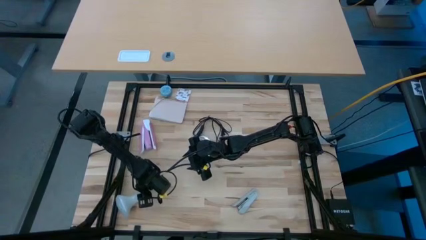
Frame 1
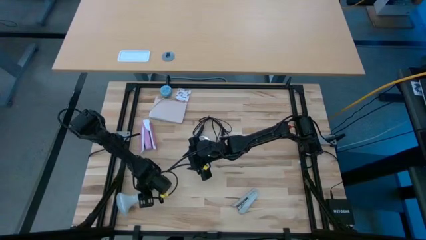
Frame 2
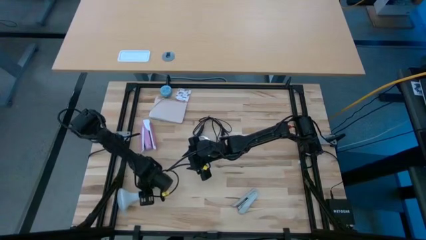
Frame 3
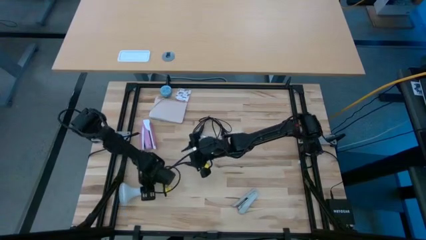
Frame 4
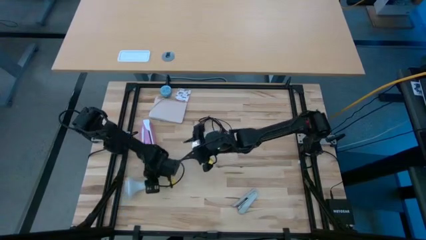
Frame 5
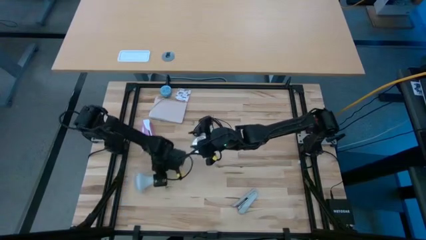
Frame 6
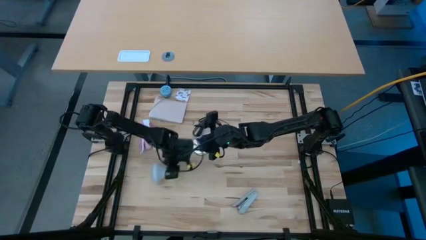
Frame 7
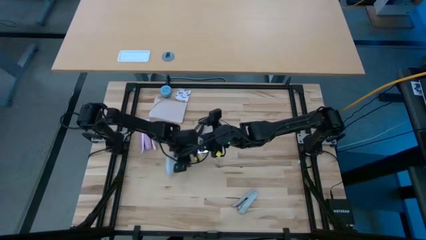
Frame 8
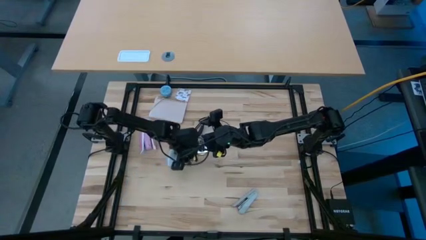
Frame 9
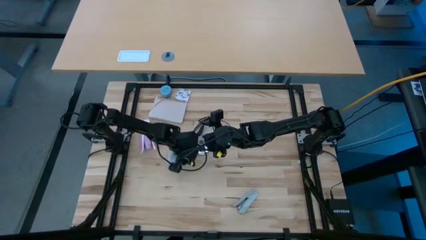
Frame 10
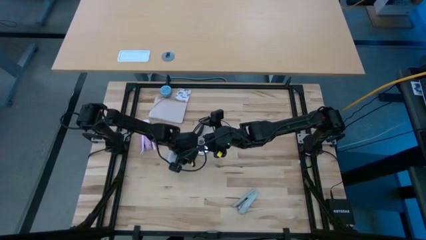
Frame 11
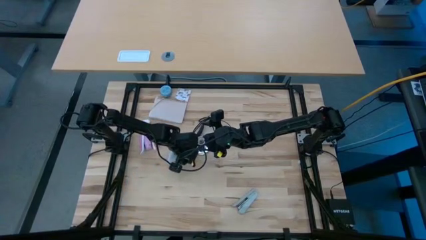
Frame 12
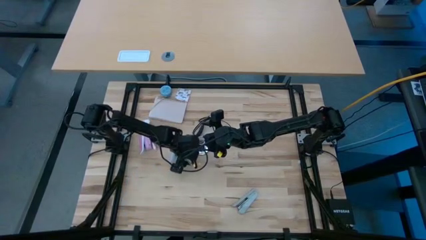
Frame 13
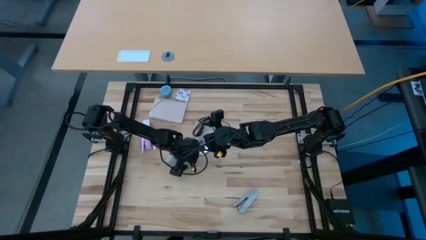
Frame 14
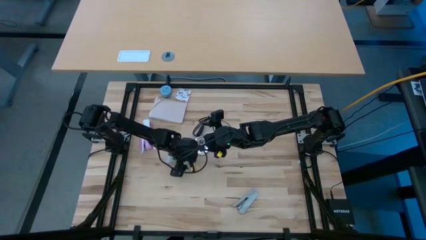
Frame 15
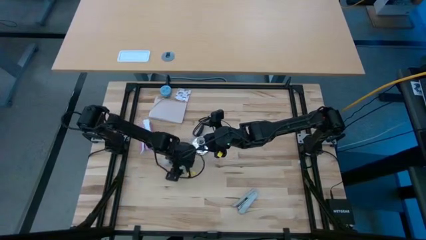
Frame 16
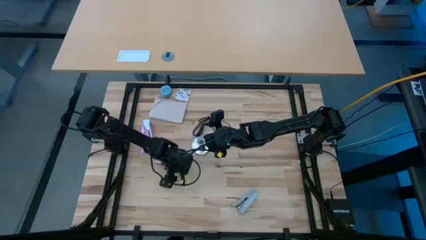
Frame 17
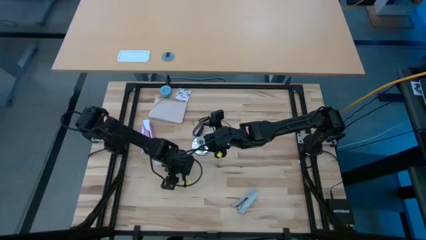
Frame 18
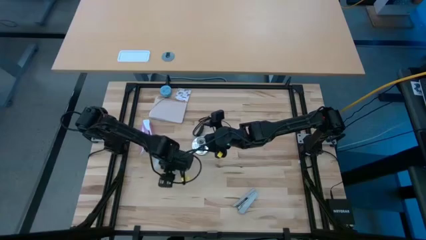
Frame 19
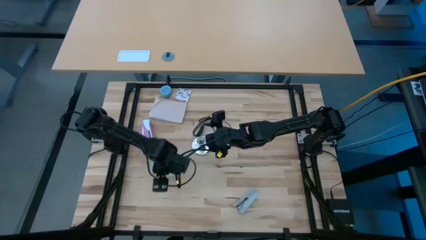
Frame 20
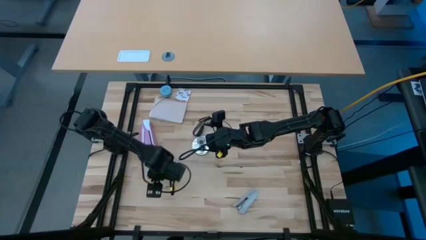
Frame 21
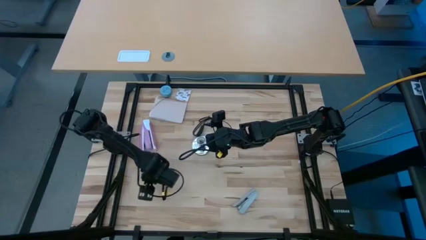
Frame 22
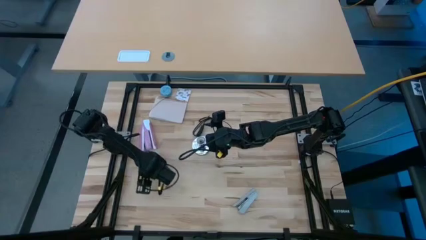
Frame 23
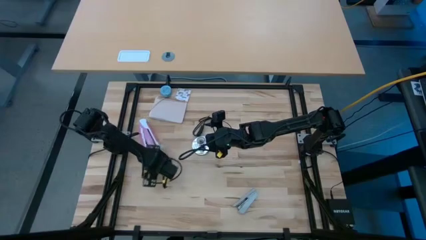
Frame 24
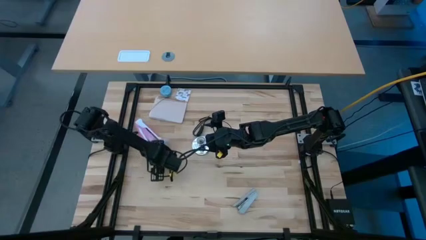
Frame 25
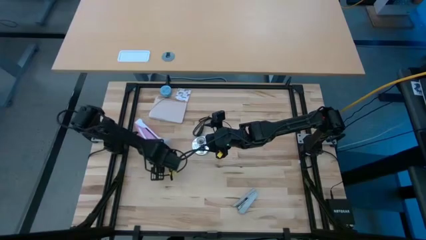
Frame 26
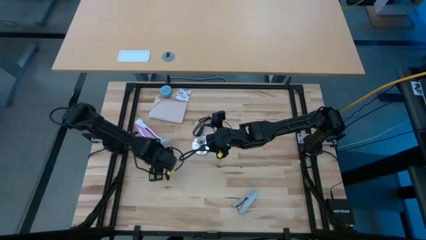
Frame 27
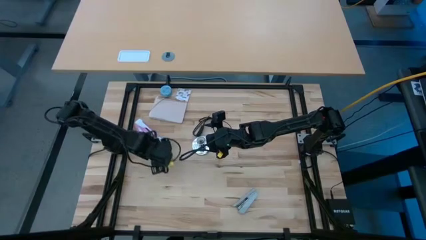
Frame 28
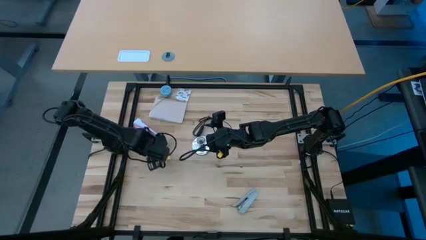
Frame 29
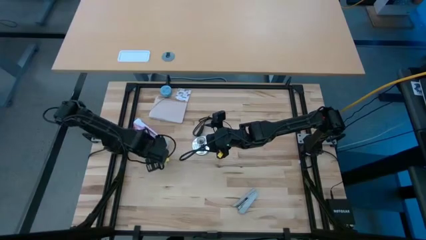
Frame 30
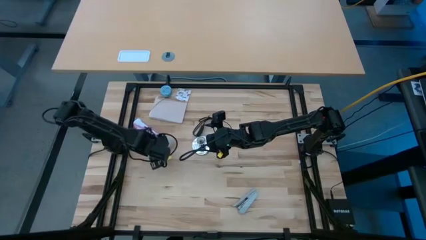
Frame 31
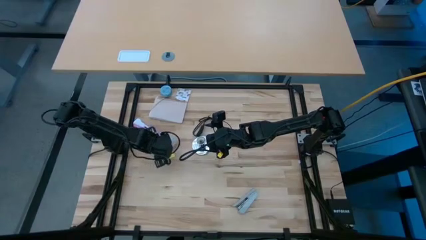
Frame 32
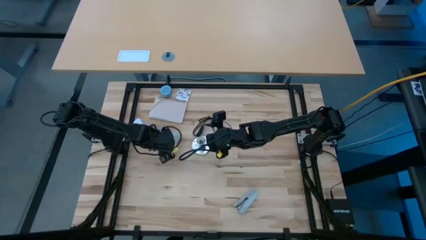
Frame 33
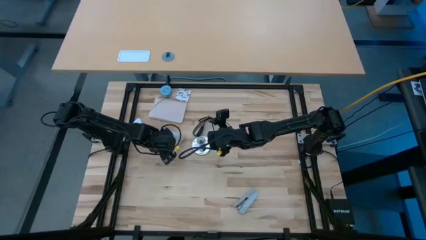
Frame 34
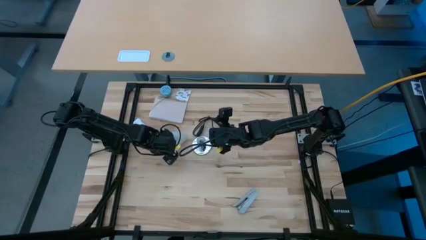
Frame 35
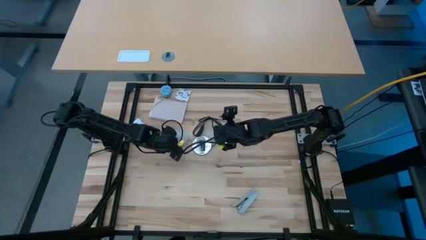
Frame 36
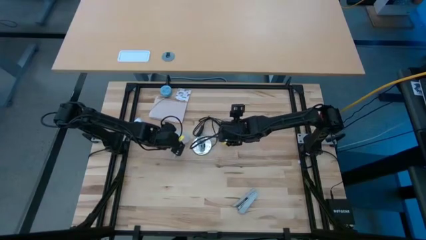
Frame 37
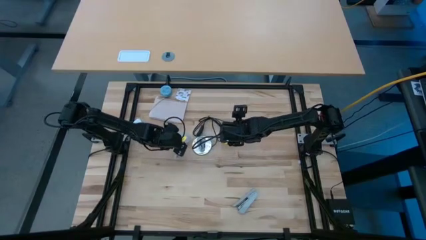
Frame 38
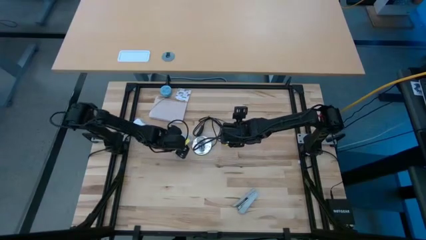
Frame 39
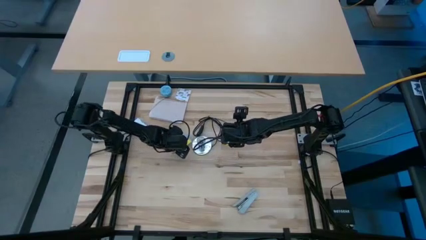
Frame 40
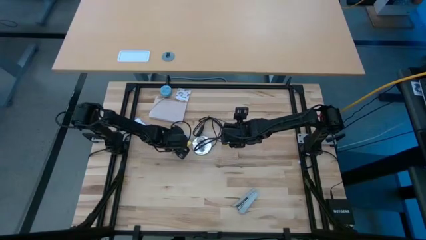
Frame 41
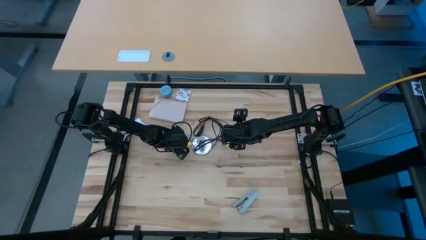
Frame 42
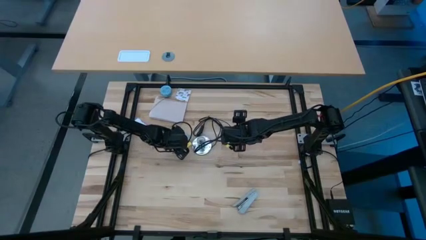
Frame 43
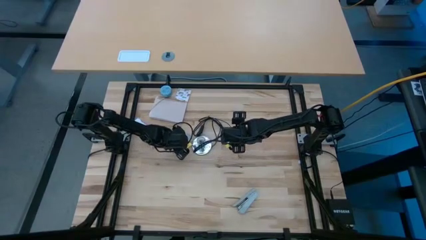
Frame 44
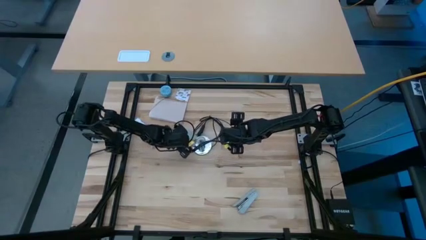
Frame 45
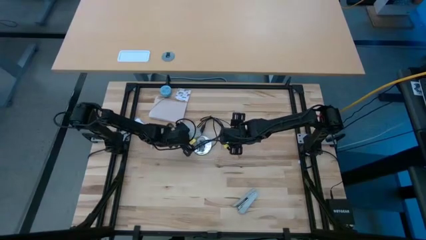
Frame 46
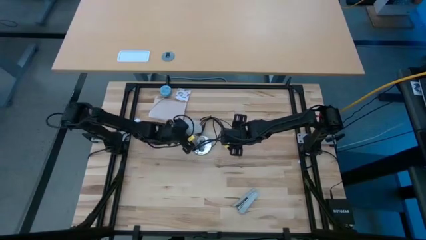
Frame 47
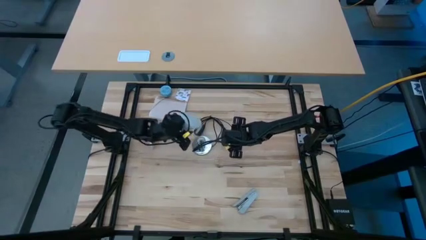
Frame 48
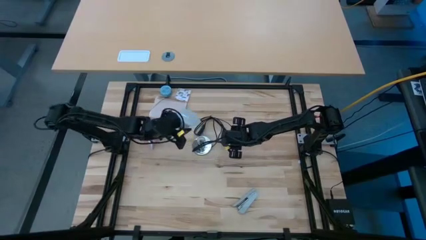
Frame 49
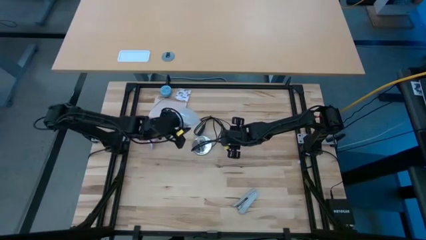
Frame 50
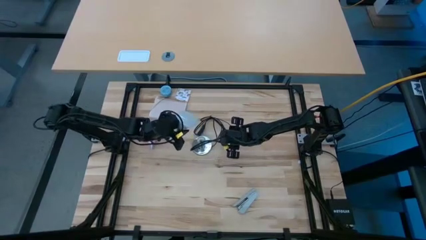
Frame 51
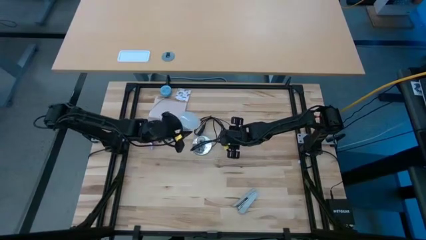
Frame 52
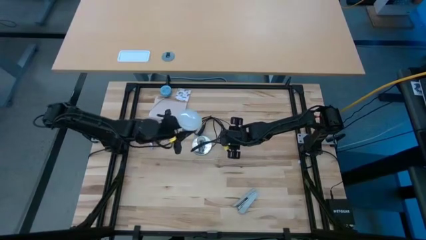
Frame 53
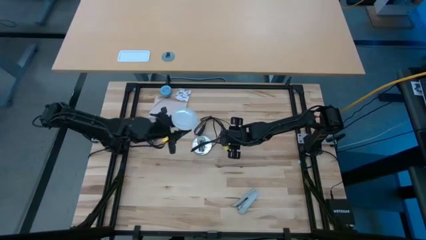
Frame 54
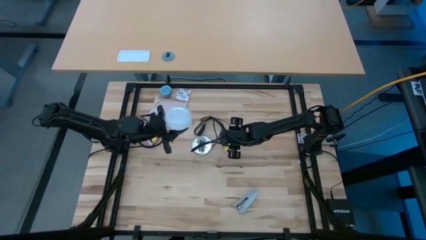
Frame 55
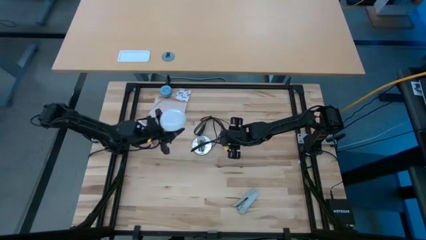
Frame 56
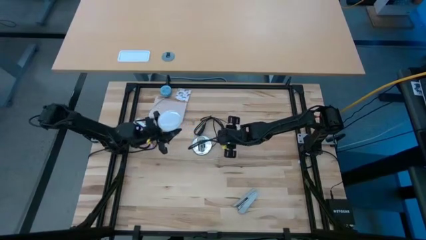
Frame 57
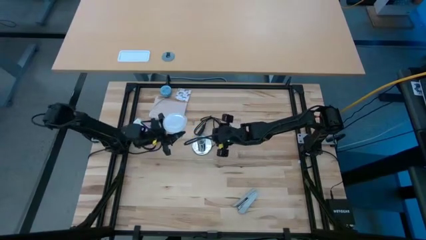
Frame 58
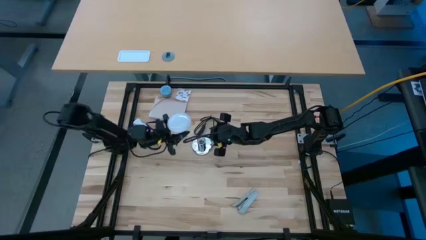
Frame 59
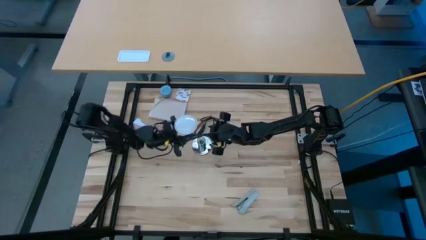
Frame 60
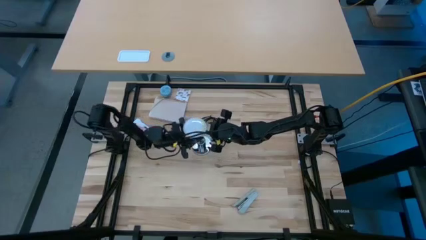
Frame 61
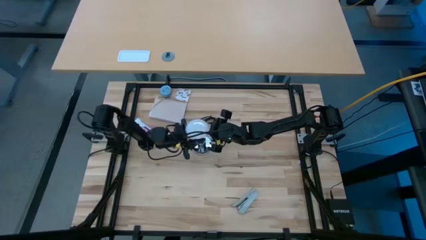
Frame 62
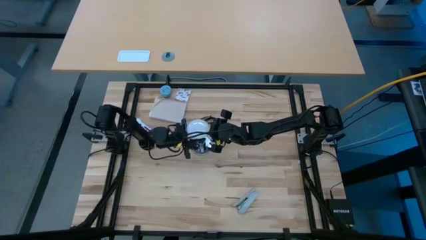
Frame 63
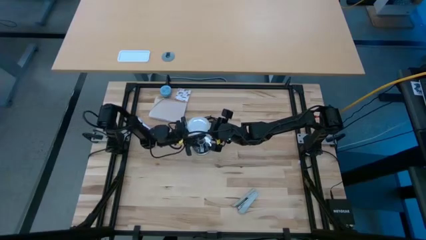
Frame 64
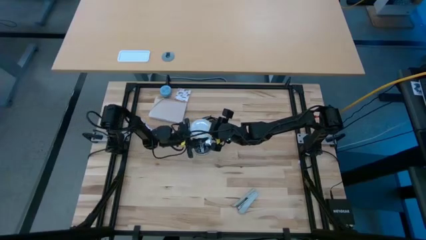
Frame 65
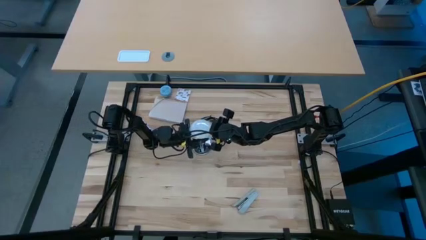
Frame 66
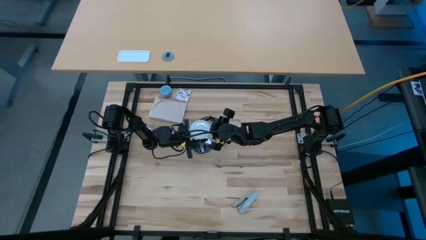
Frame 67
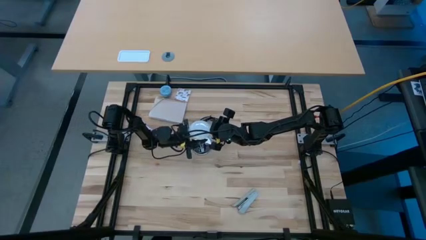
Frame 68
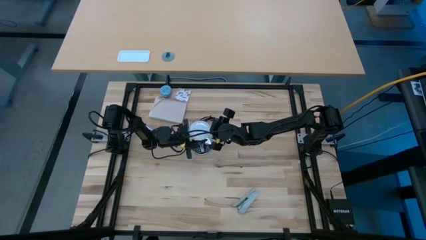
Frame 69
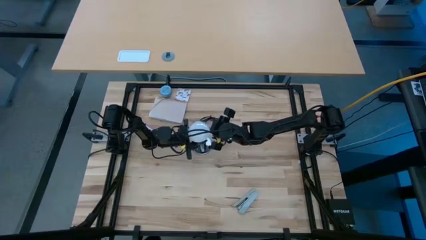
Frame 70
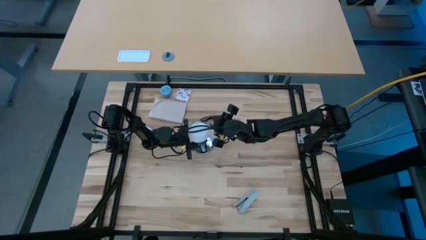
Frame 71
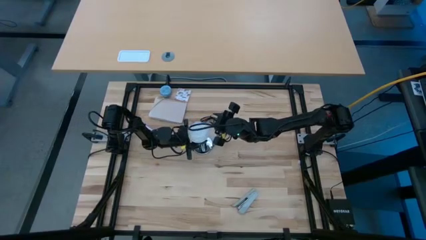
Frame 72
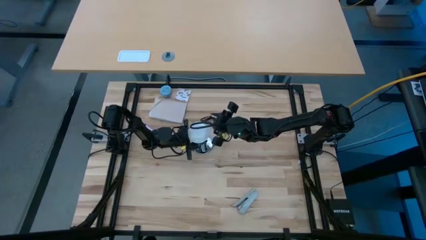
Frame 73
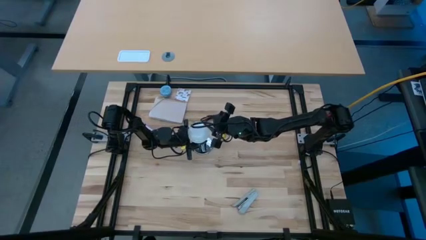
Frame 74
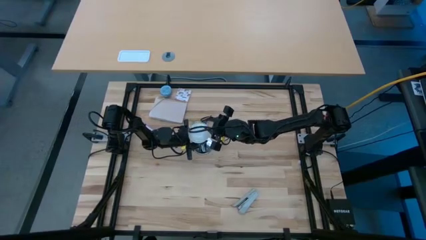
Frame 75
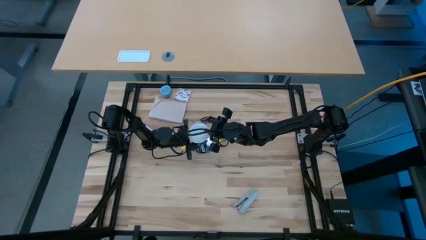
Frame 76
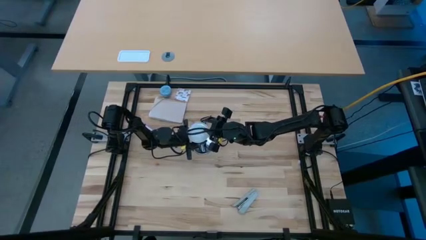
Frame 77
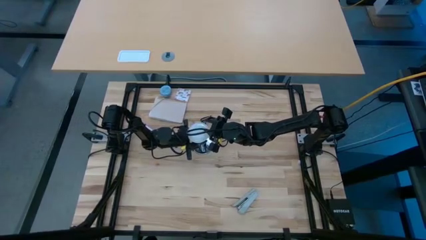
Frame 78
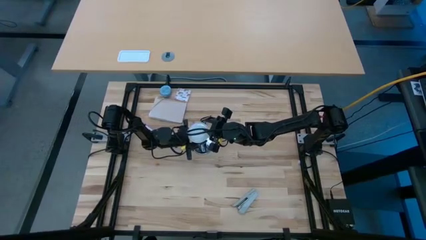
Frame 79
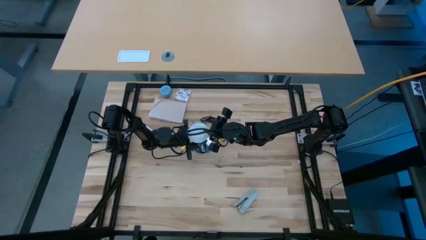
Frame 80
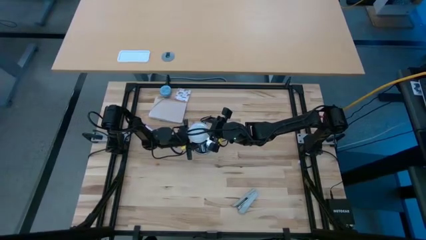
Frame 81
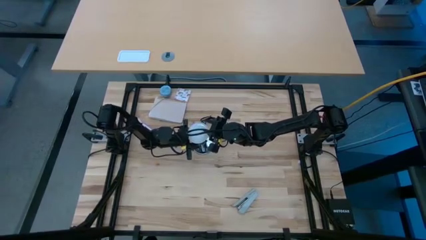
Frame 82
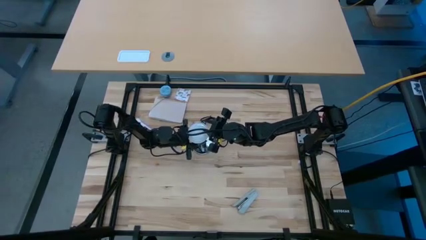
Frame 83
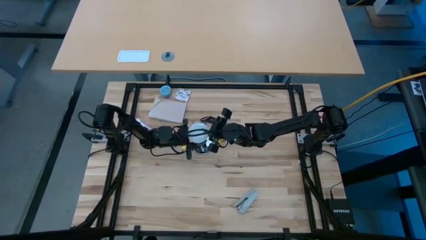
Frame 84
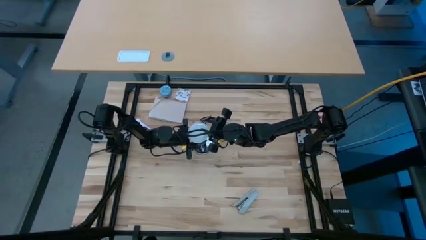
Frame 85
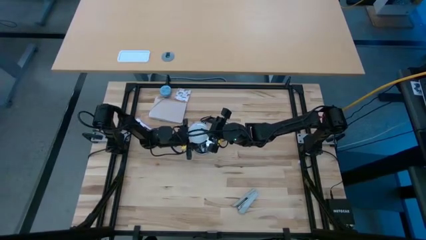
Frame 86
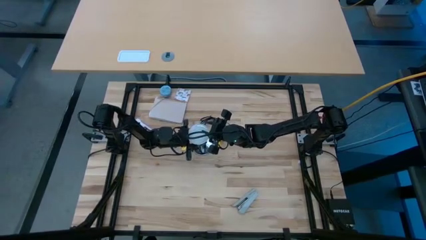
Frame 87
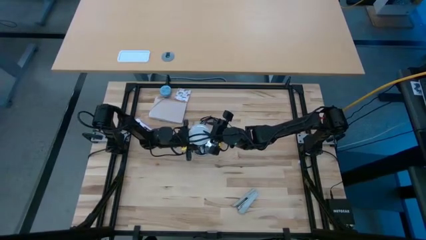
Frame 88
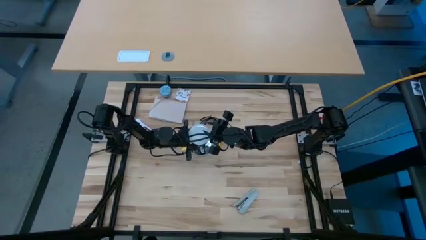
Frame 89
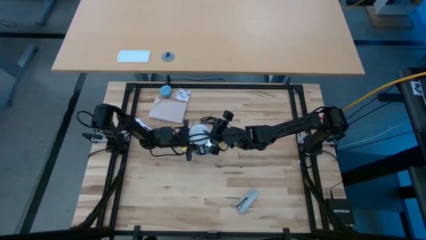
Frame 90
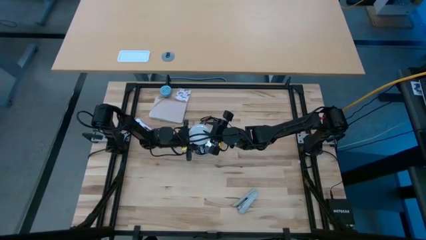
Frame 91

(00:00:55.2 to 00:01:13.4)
Task: Screw lightbulb
Insert the light bulb into the lamp
